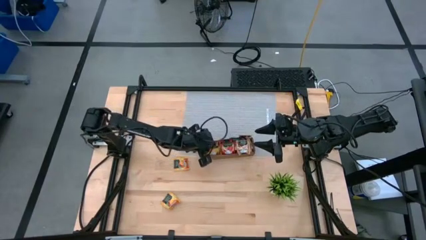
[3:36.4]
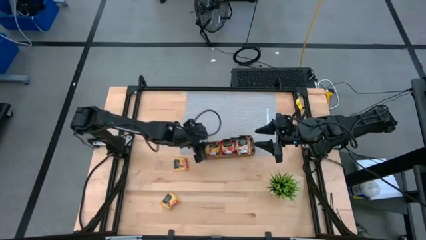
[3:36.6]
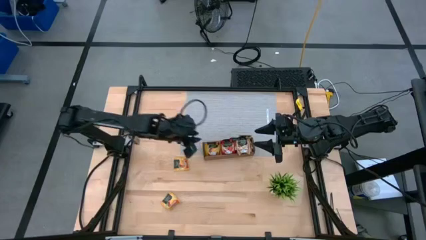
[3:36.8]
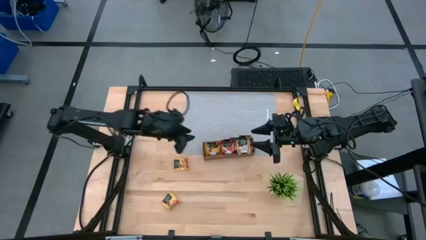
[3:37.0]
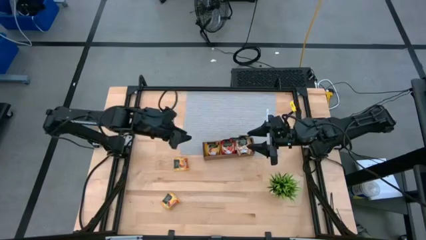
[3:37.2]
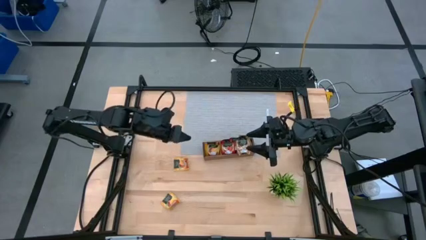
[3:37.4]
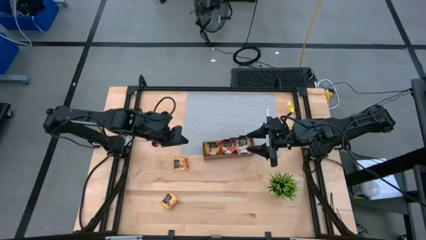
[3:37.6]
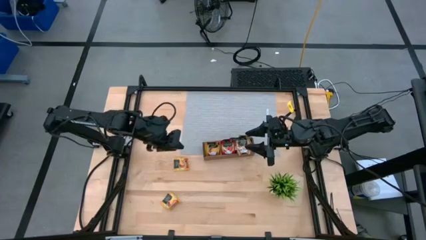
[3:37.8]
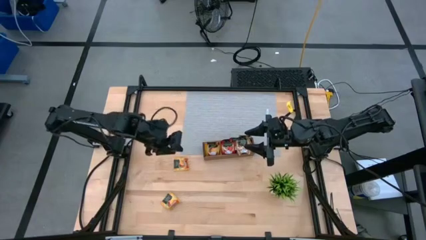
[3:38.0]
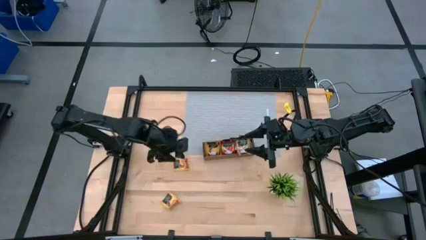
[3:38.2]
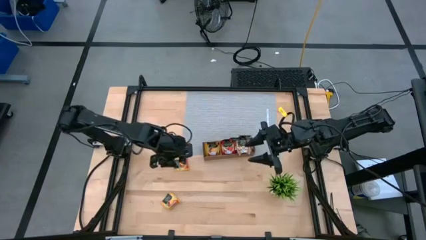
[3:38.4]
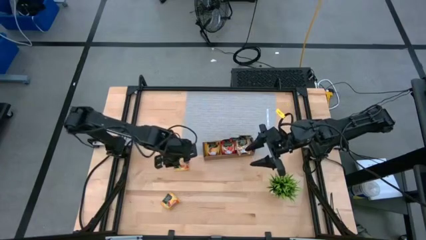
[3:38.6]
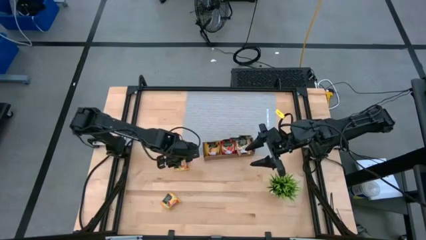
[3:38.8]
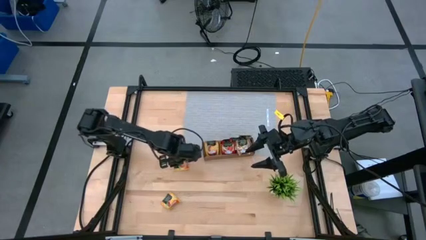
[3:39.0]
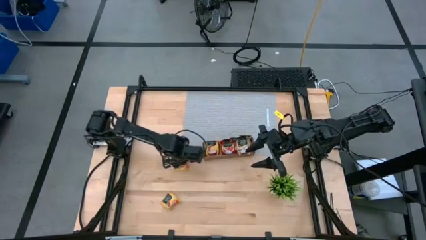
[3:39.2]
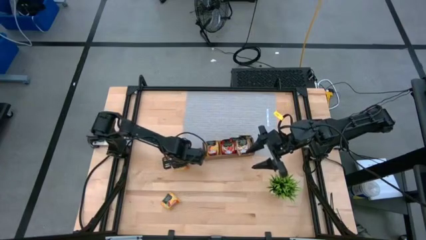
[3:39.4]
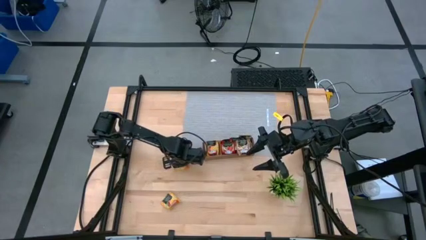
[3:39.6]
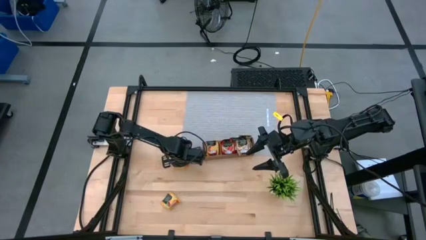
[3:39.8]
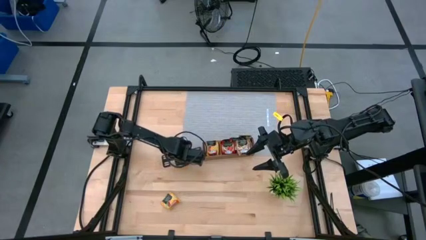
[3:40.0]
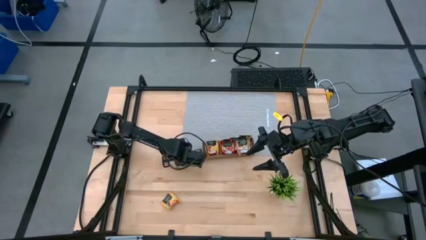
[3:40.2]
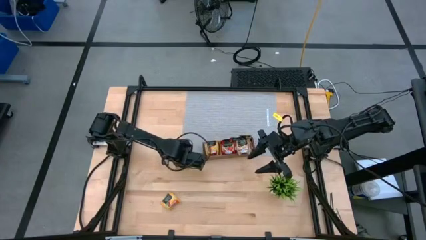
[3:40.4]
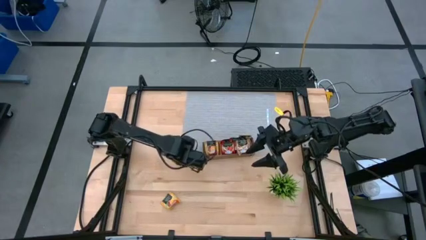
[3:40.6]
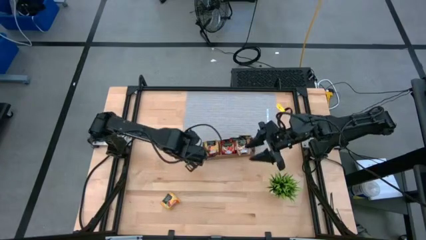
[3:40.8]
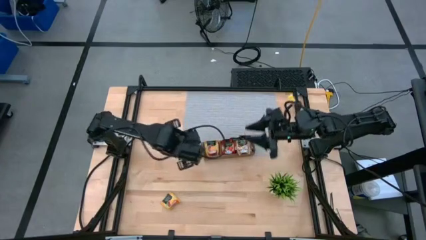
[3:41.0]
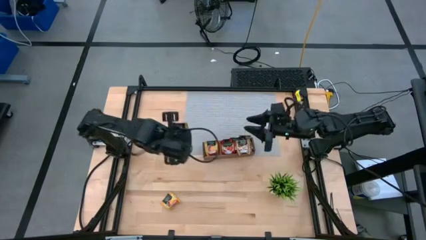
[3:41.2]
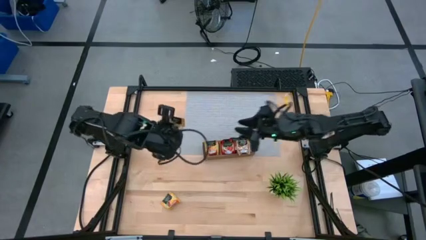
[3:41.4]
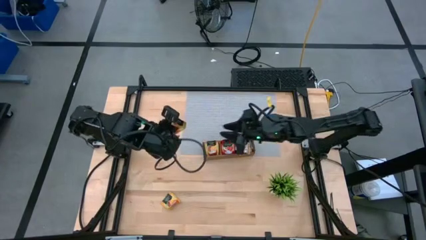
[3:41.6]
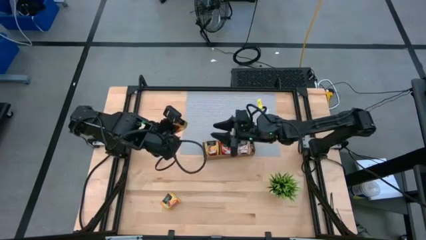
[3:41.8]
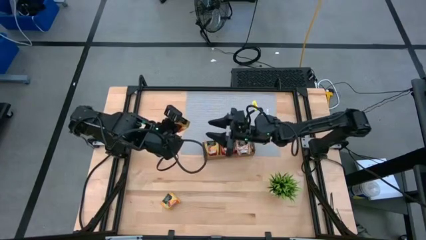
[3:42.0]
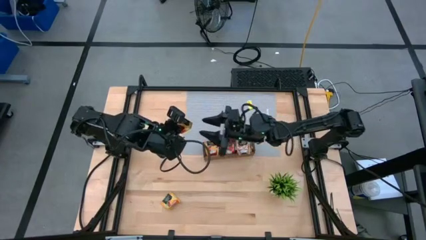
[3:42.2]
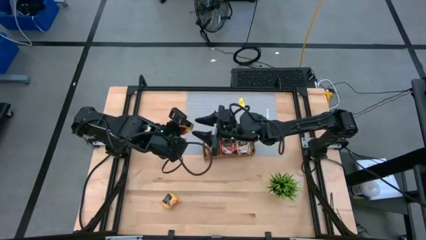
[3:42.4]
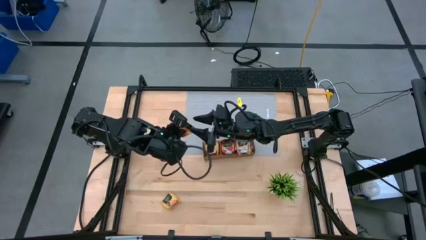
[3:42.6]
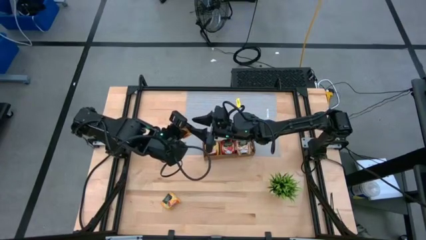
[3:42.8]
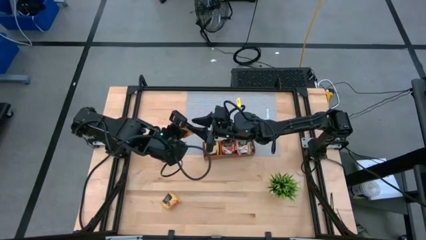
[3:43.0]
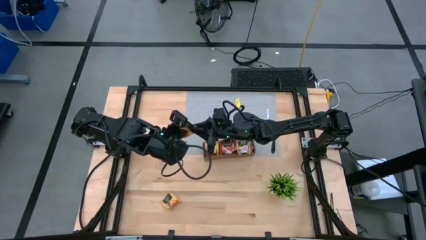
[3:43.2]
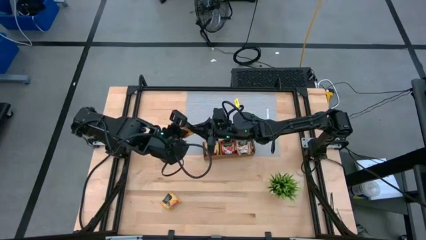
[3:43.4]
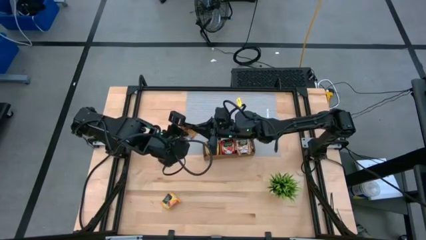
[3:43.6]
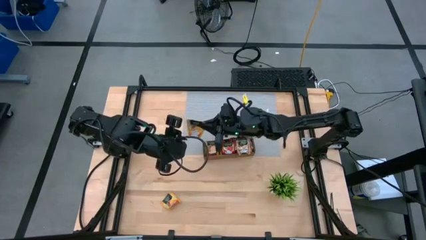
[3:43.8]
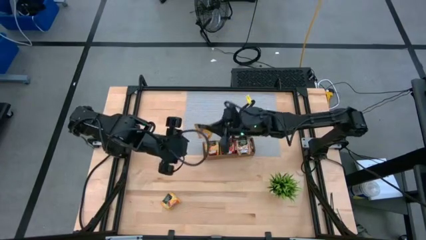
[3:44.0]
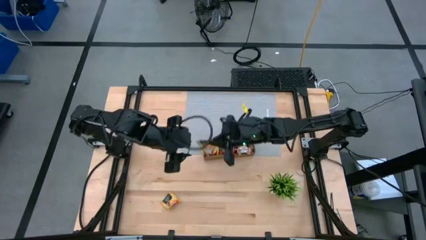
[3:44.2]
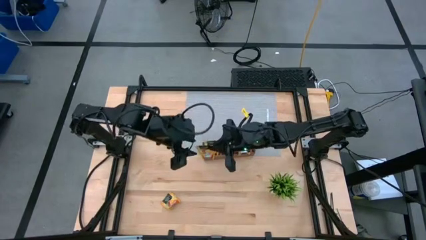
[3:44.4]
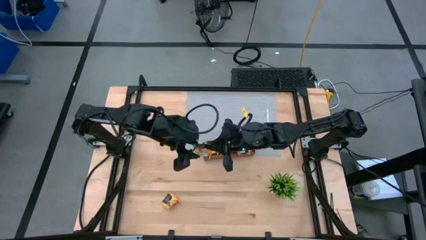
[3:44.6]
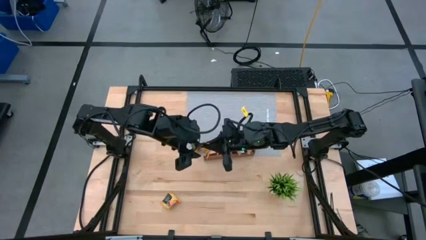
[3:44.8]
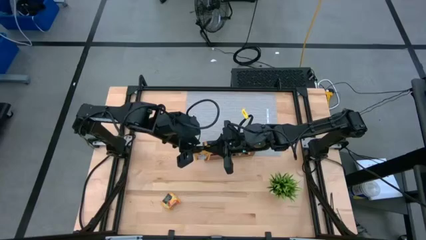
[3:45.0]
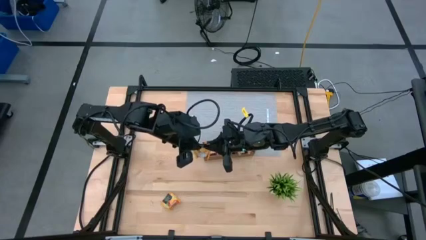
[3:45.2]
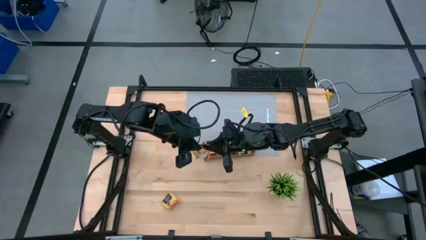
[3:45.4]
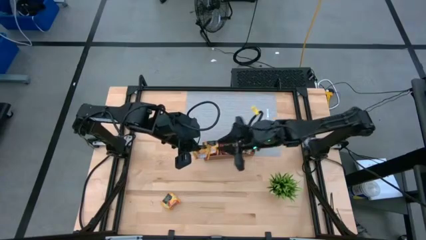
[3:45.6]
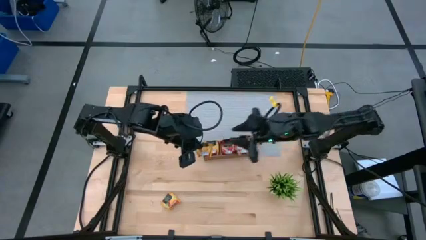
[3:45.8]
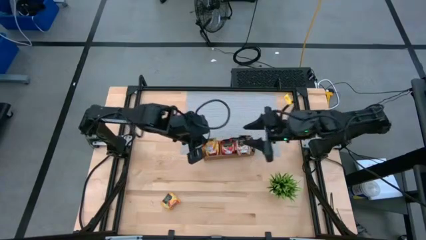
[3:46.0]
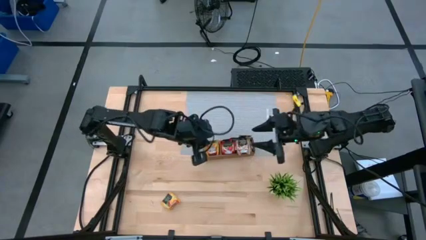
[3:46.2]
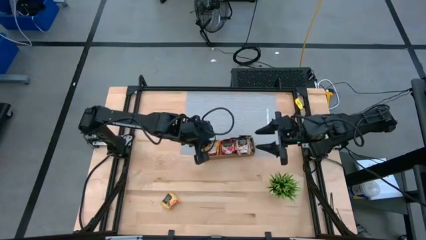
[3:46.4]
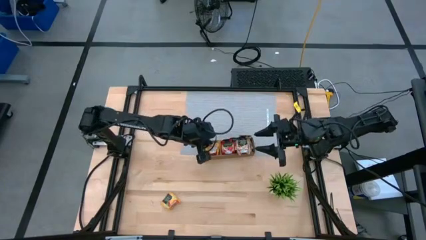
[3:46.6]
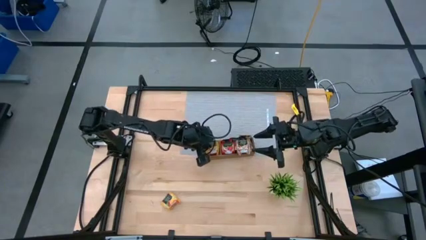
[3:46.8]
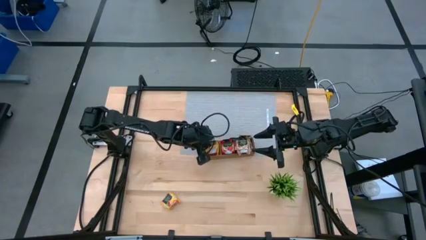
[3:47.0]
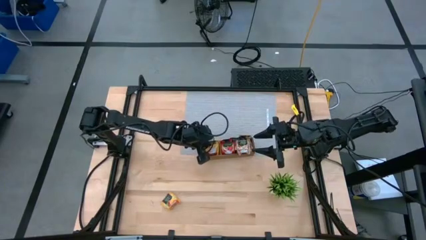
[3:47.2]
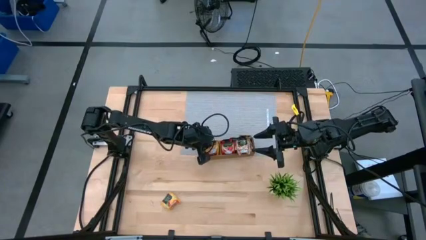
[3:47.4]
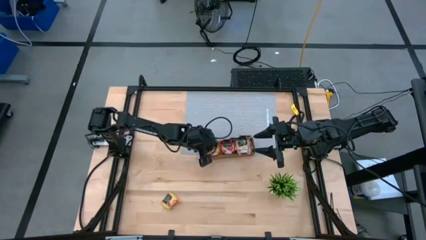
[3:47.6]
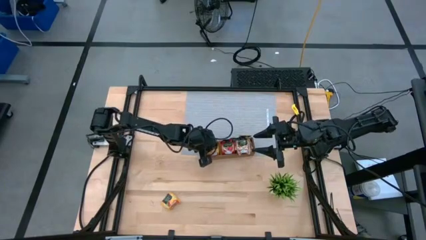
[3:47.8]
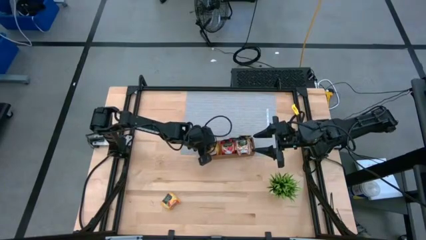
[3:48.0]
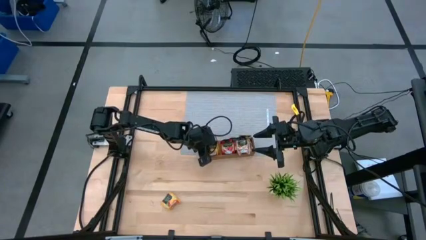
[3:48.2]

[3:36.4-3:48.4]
Task: Pick & Place Tea
Put the yellow tea bag into the left section of the wooden organizer

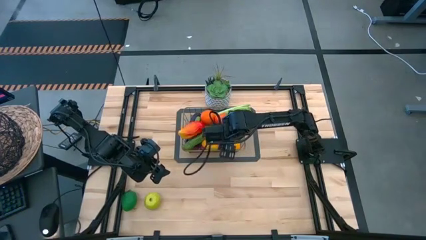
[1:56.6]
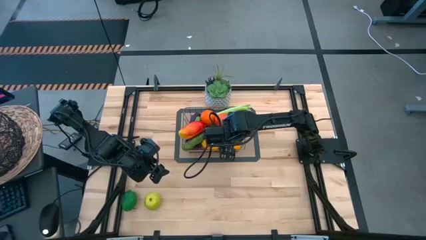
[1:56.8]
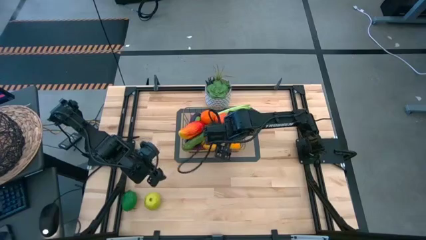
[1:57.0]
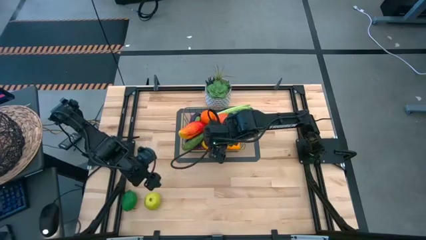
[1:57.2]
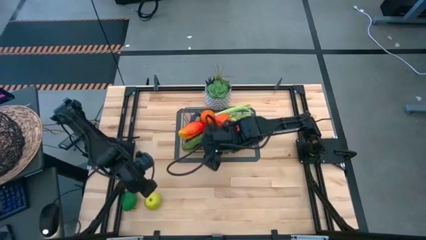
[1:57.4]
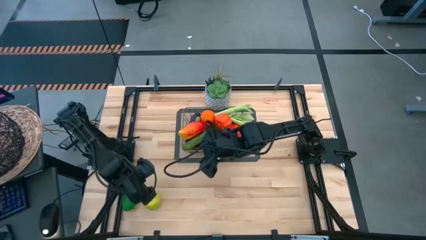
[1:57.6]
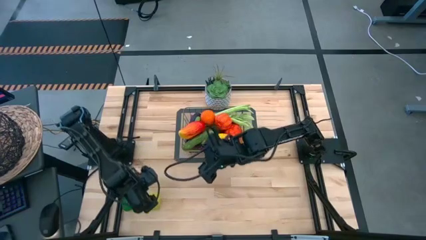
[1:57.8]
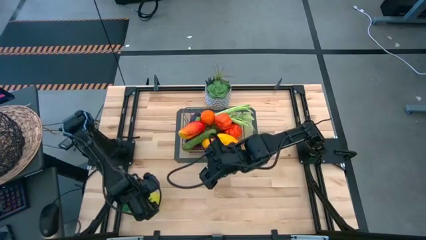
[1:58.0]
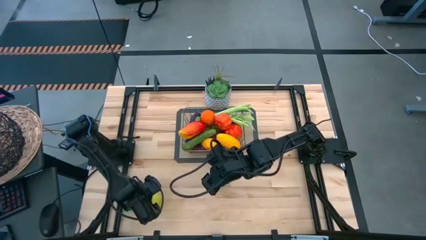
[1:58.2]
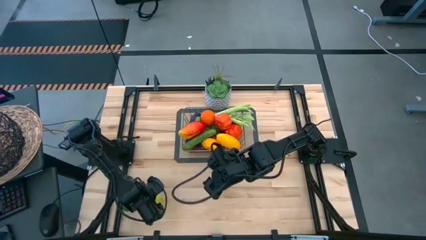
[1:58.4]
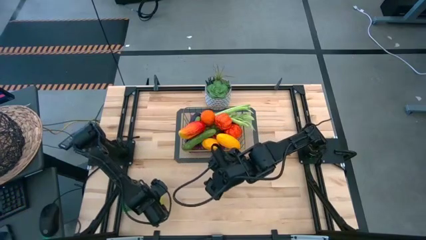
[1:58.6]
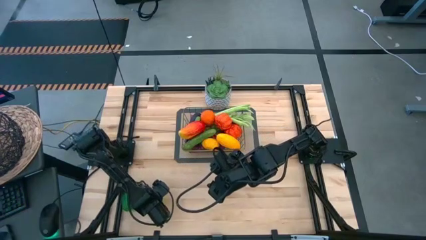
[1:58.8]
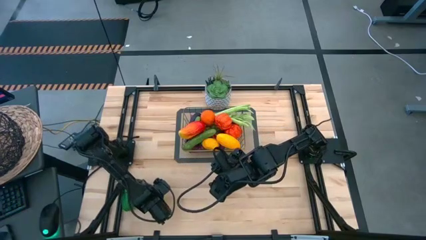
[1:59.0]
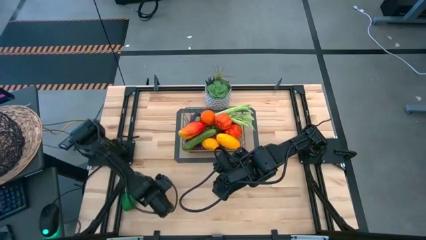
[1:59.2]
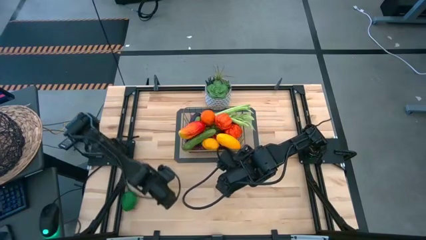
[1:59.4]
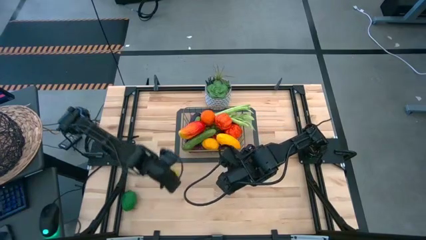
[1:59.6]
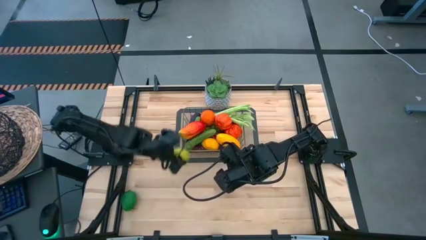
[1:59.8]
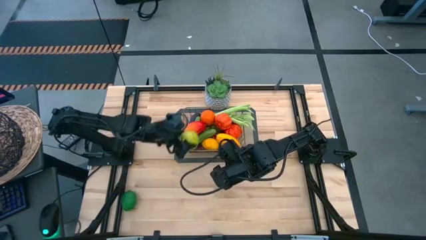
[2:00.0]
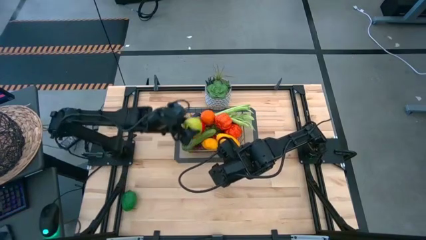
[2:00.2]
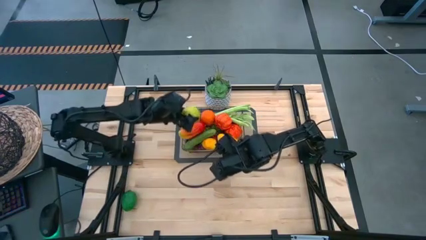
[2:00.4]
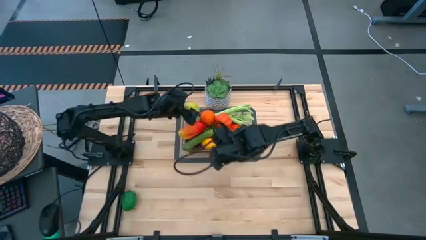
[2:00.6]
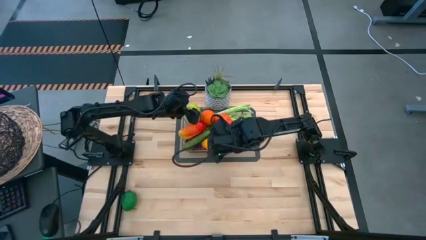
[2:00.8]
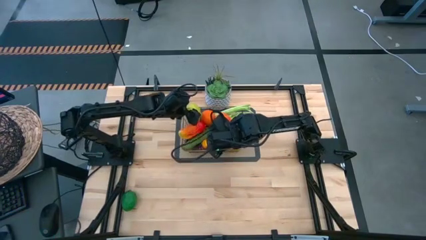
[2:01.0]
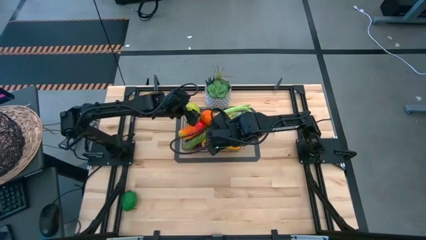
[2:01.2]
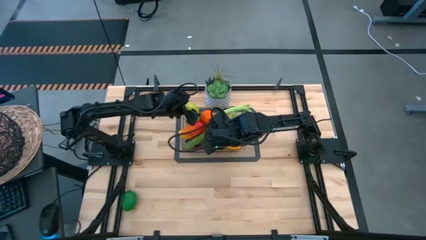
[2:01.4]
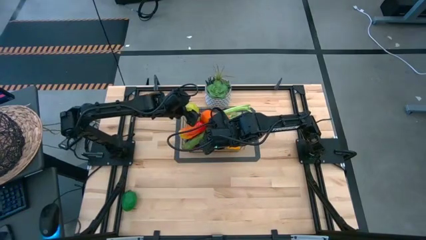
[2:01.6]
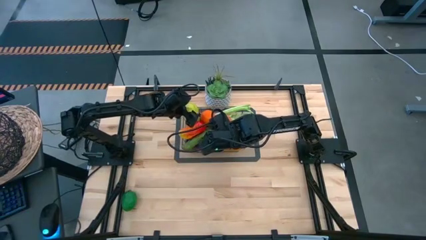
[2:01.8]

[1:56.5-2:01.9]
Task: Build produce basket
Put the green apple into the wire basket
